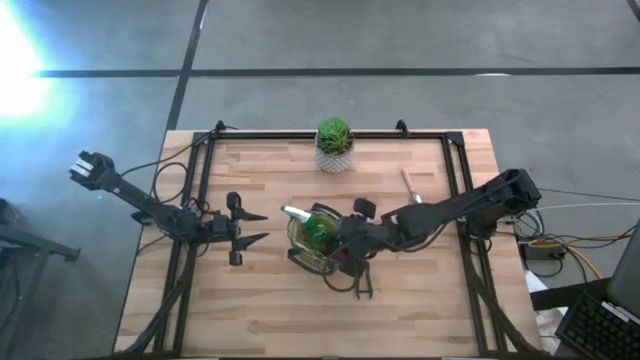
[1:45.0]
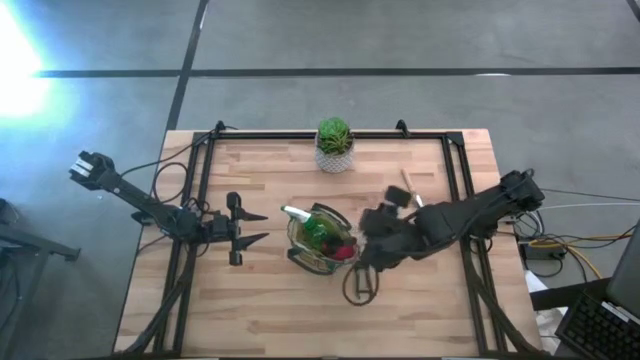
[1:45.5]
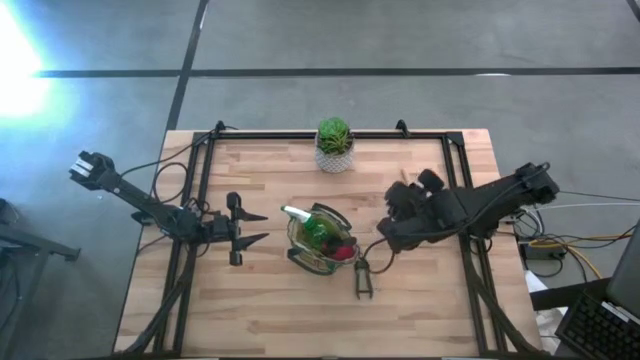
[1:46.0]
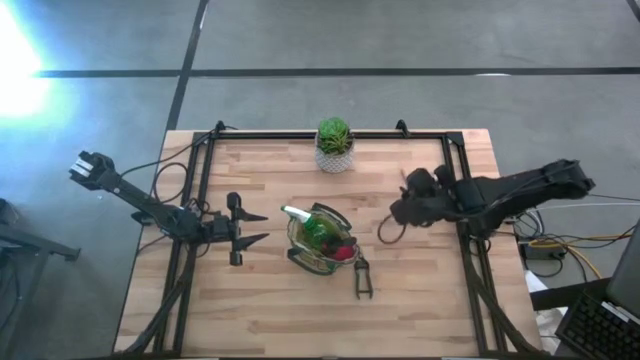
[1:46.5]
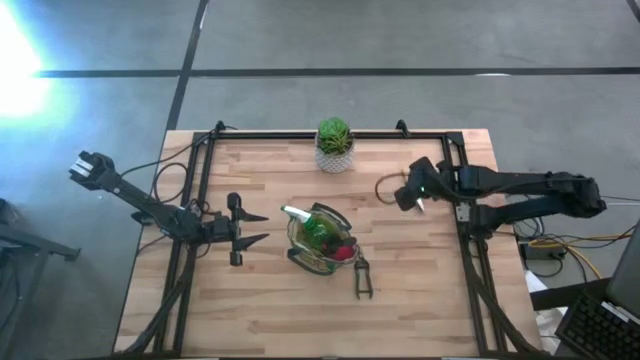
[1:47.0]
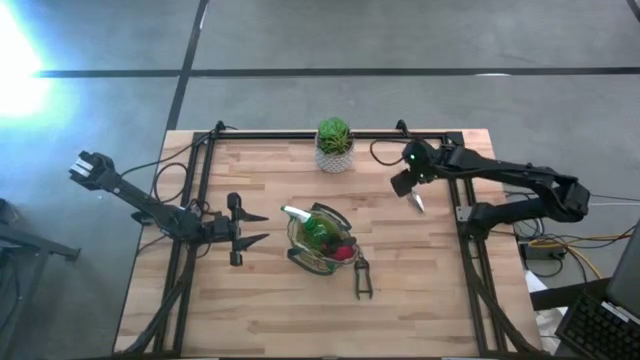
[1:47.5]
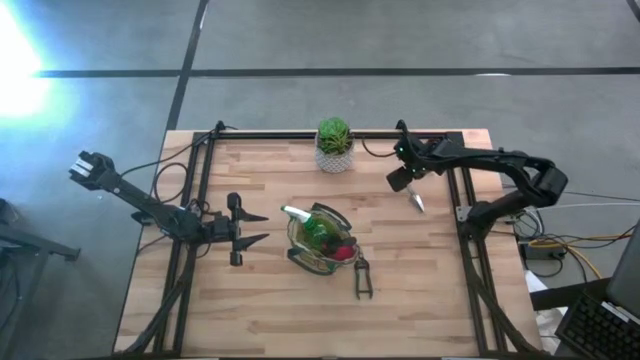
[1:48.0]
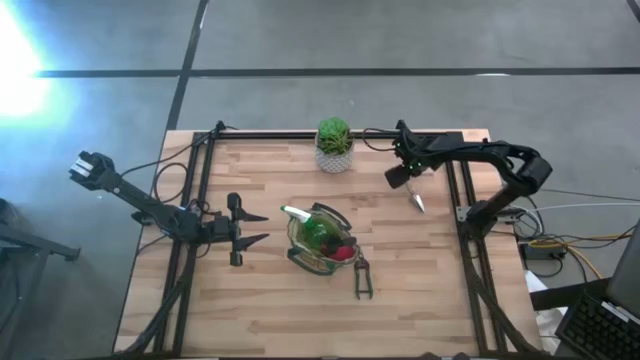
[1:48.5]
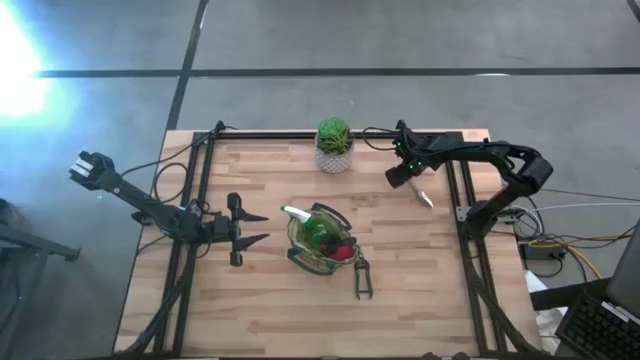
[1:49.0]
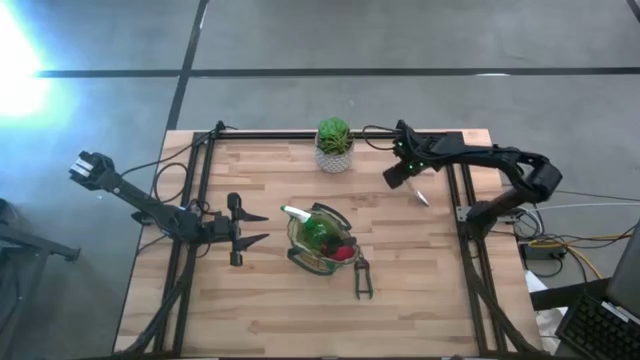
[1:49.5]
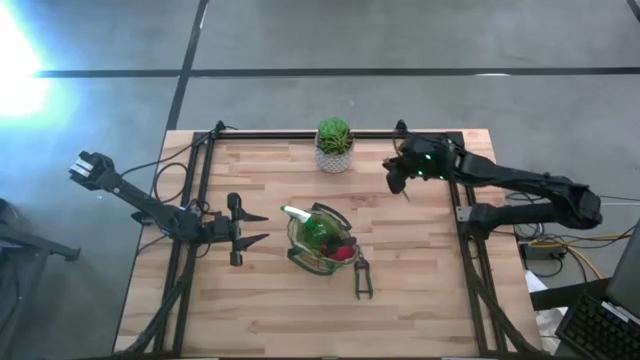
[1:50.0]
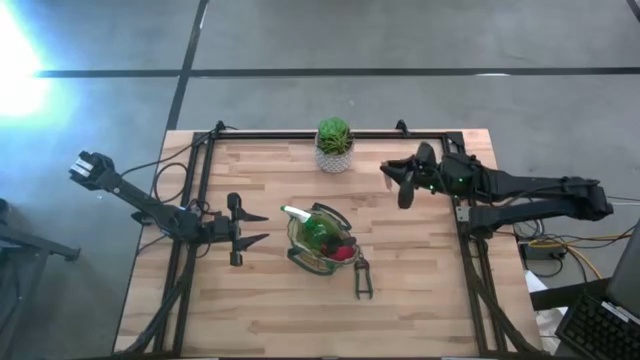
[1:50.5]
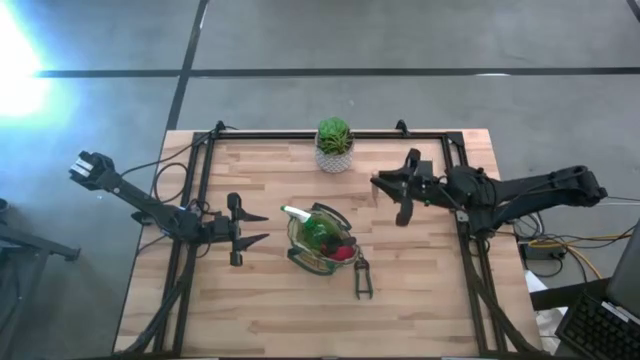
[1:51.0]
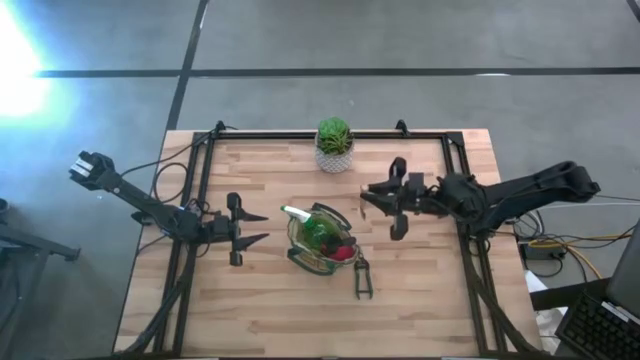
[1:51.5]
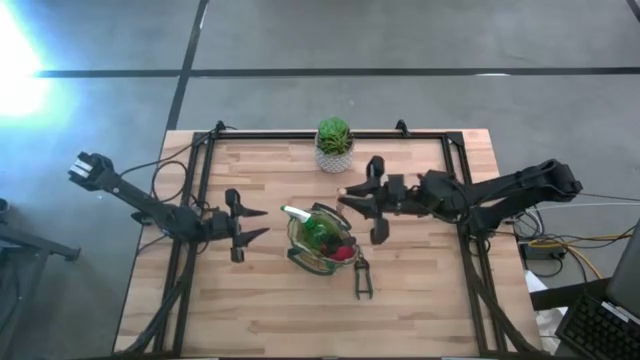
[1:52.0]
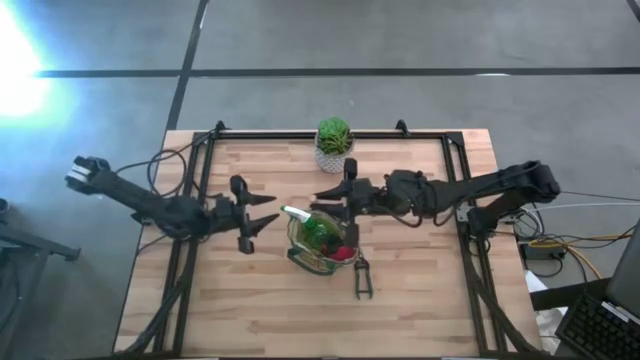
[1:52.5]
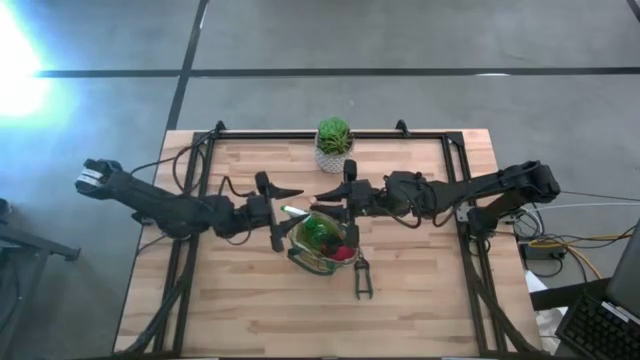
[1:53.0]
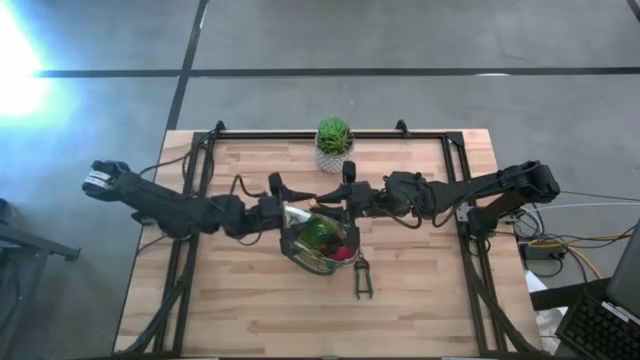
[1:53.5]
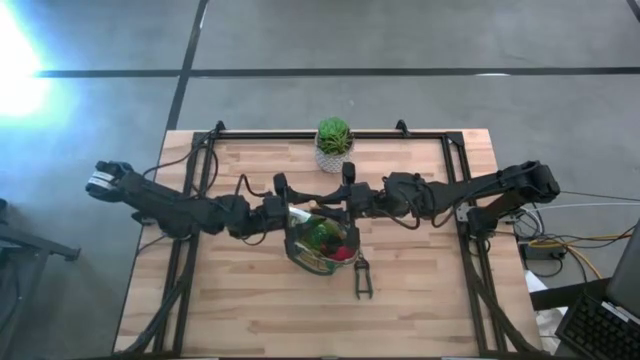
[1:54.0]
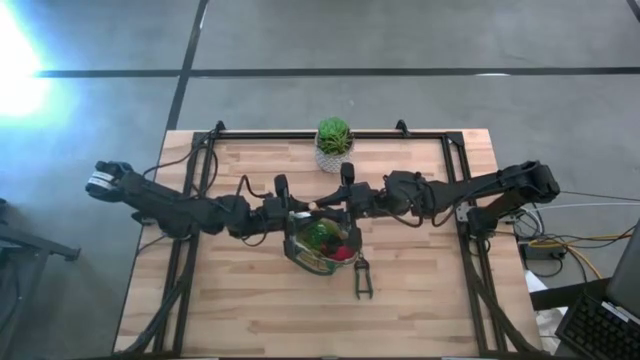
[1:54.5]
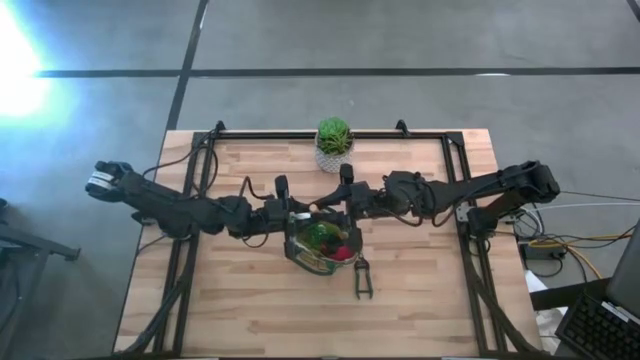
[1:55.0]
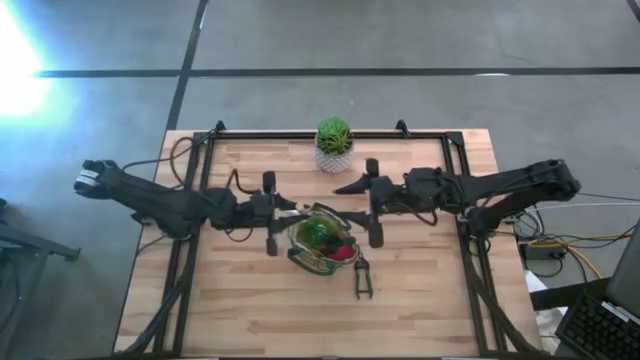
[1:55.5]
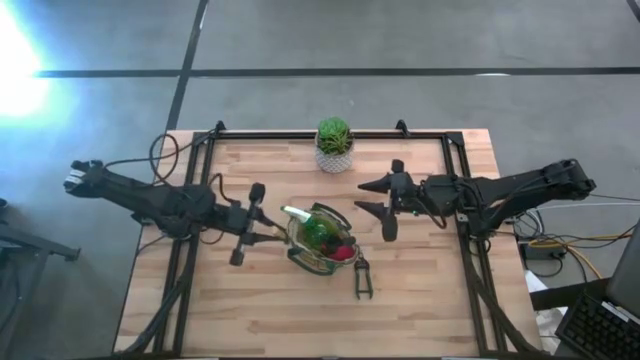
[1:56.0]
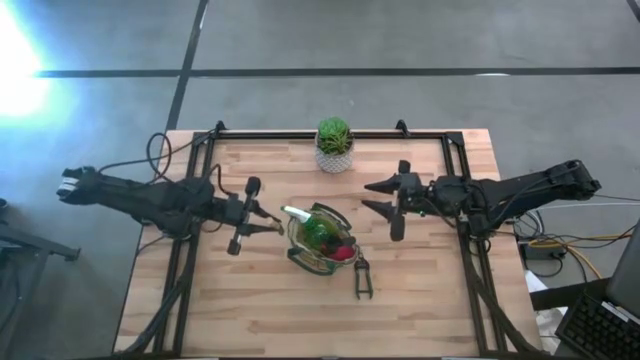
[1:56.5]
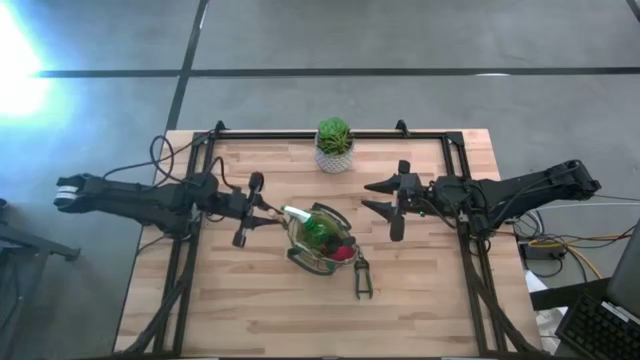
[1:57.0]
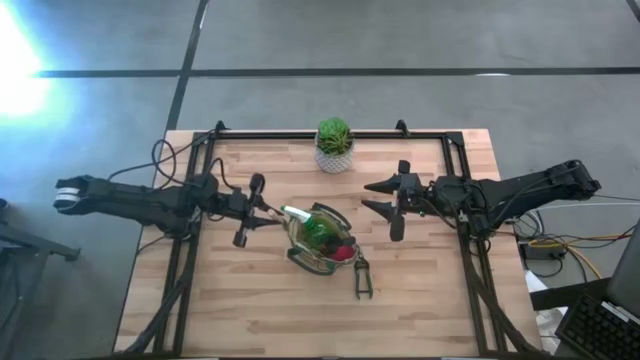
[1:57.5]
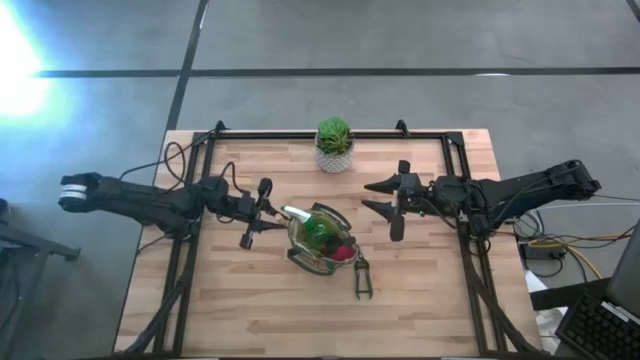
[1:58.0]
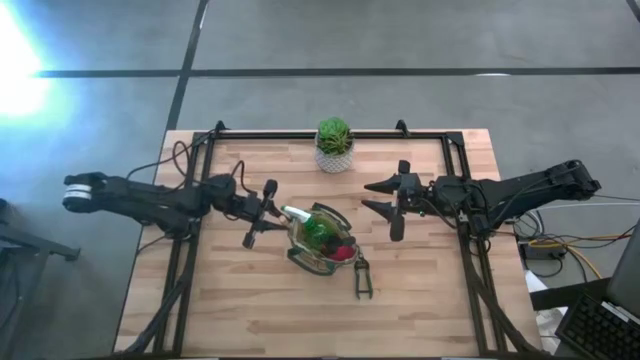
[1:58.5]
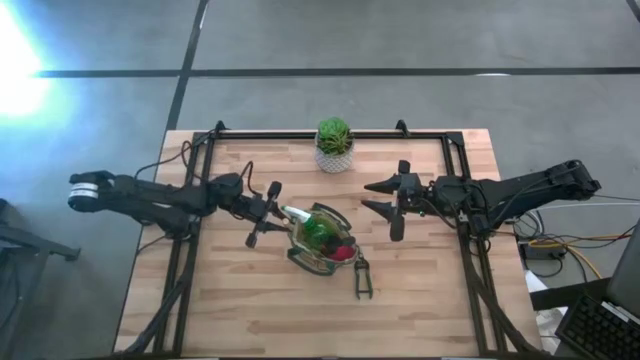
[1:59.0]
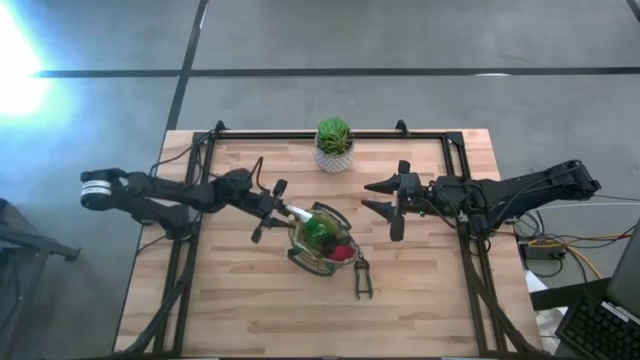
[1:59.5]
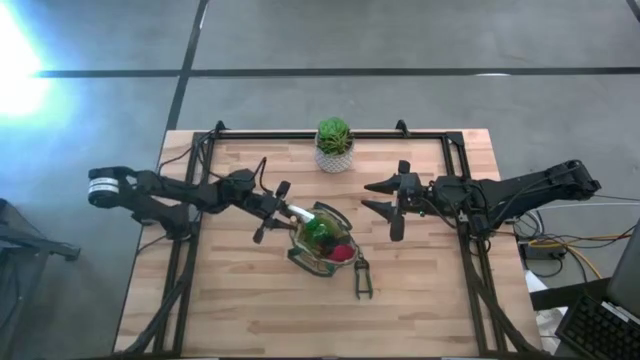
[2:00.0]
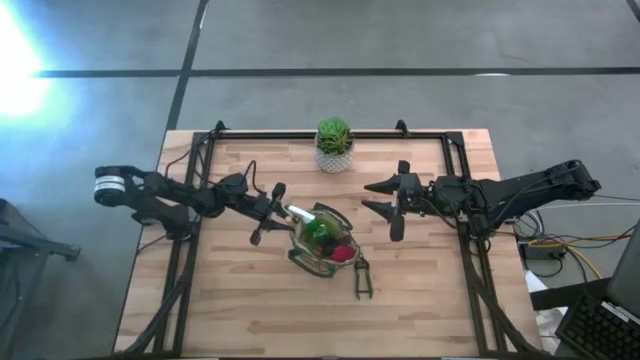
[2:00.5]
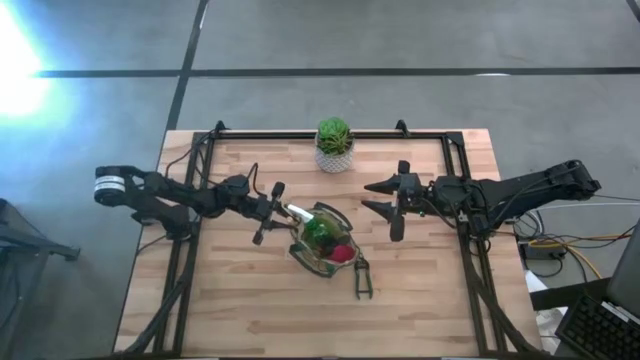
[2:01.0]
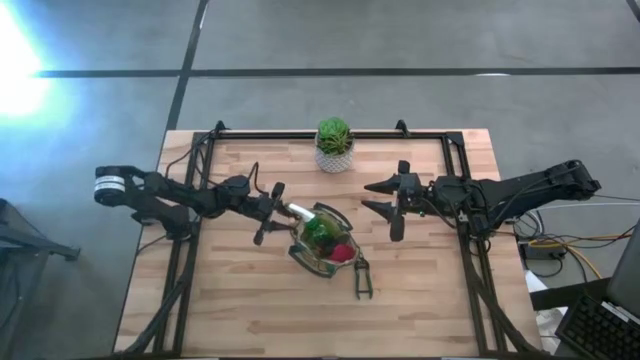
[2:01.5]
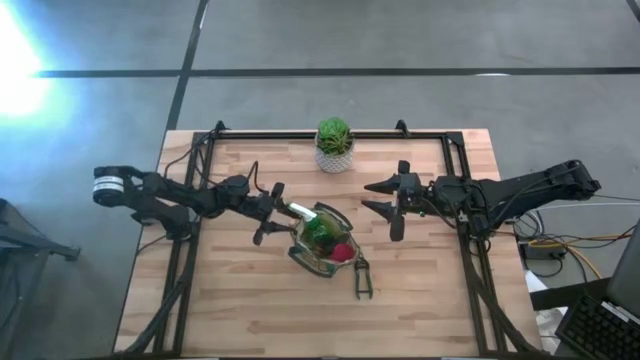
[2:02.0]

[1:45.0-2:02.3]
Task: Pick & Place Garden tools in Gardening bag
Put the brown trowel into the white gardening bag

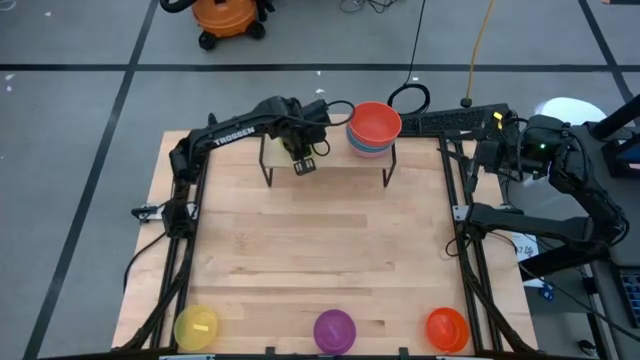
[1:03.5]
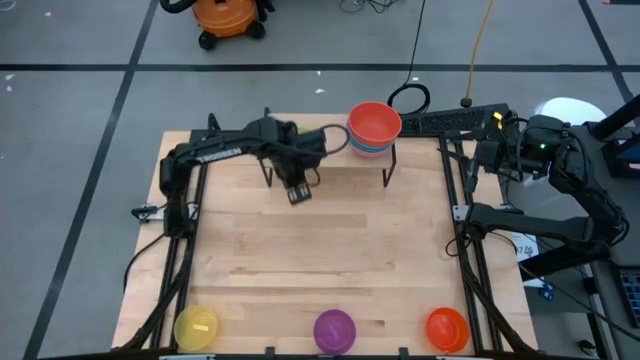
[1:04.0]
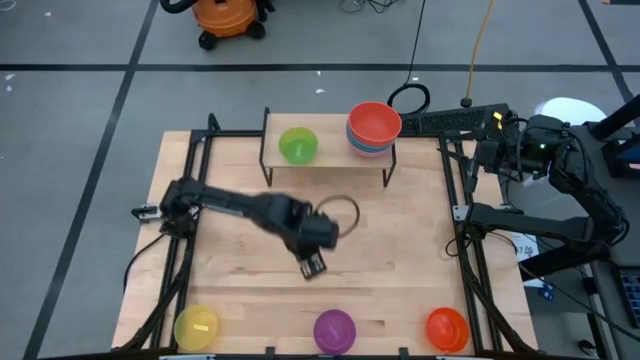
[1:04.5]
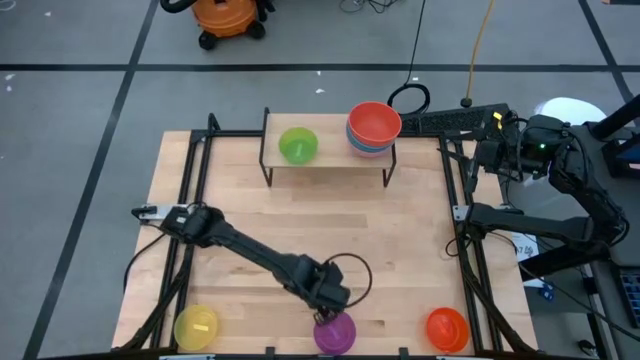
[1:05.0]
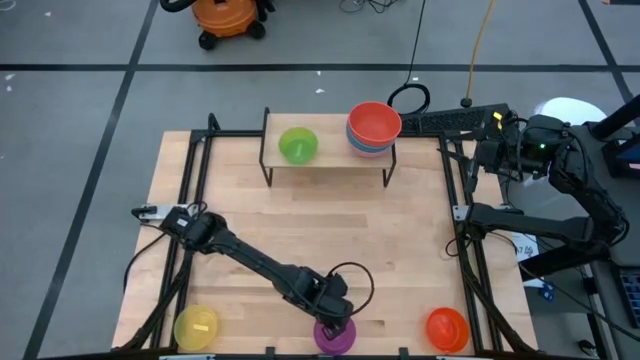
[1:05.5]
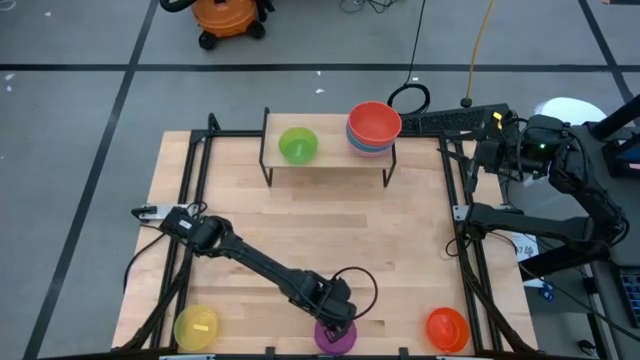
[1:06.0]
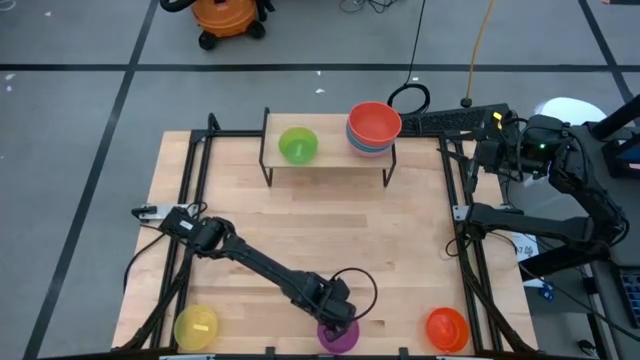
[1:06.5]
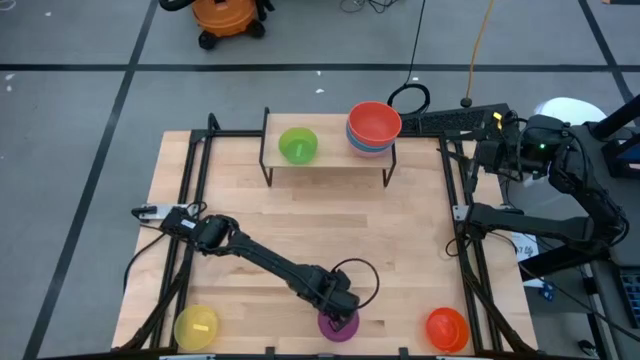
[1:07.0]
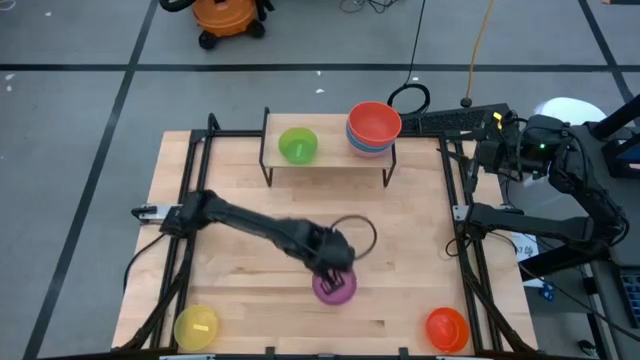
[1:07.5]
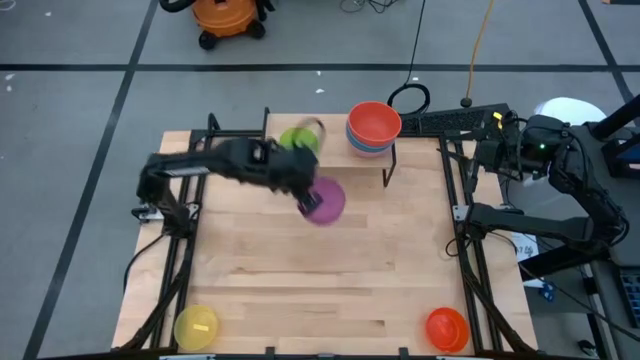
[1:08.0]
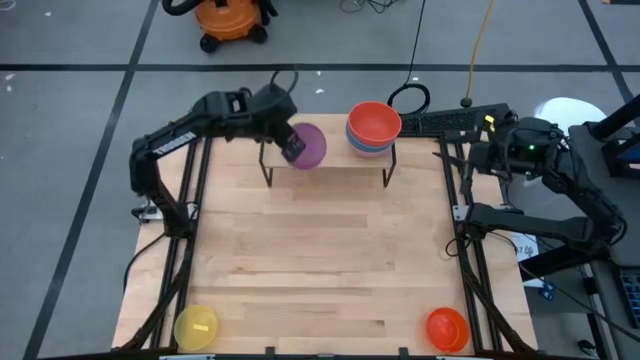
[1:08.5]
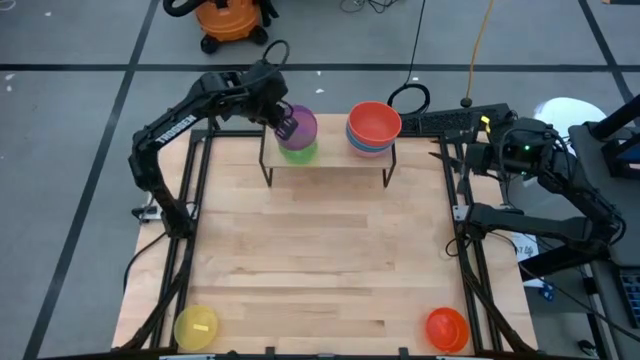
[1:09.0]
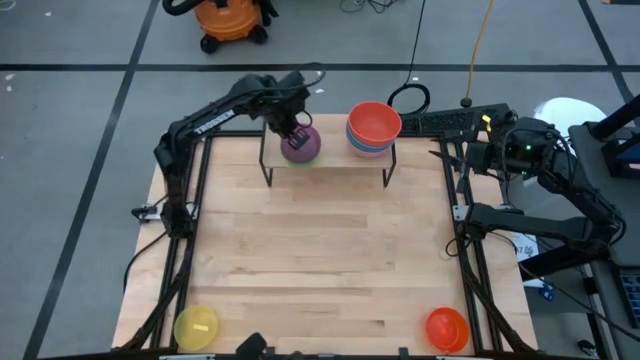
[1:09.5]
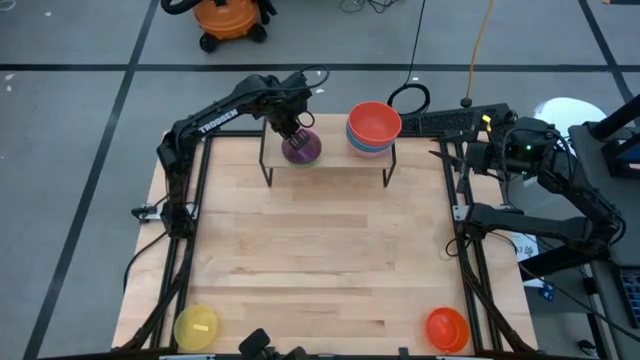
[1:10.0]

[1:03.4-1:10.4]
Task: Place and stack bowls onto a shelf
Stack the light purple bowl on top of the light green bowl on the shelf
